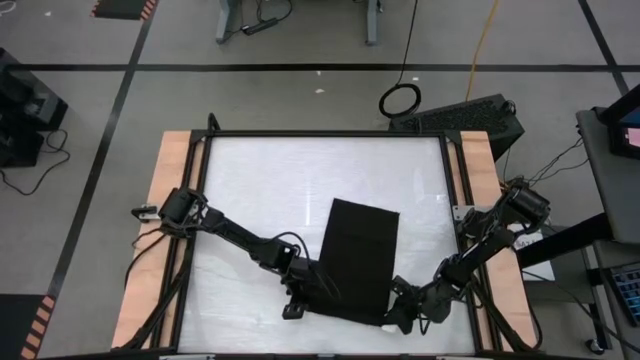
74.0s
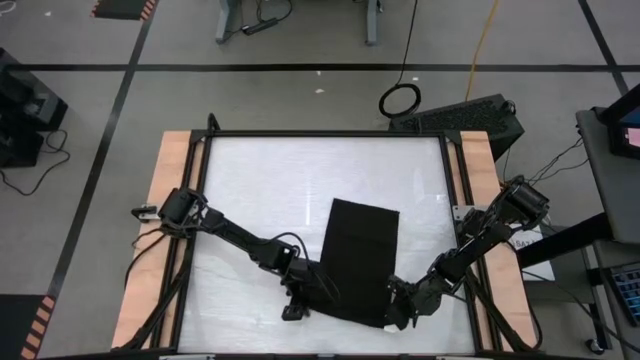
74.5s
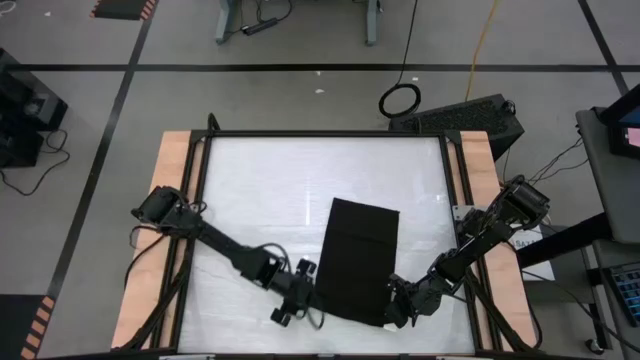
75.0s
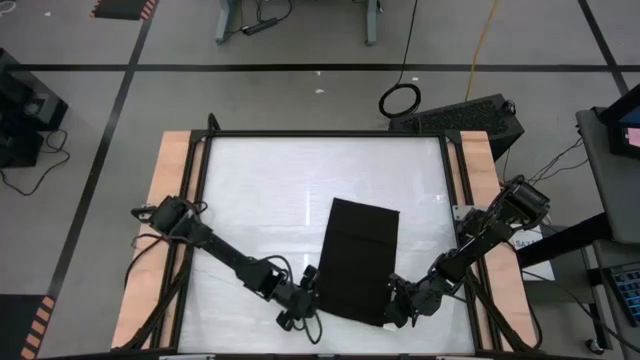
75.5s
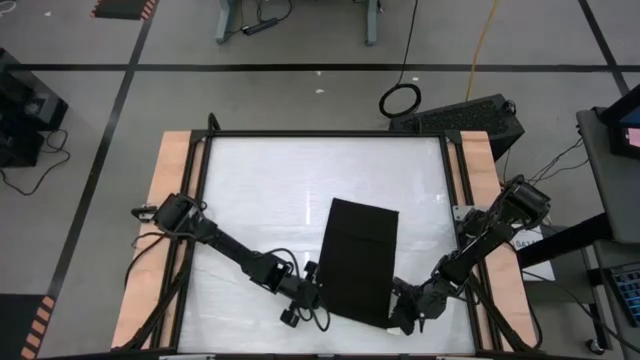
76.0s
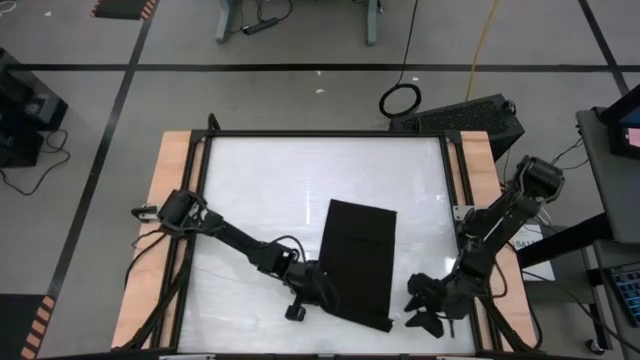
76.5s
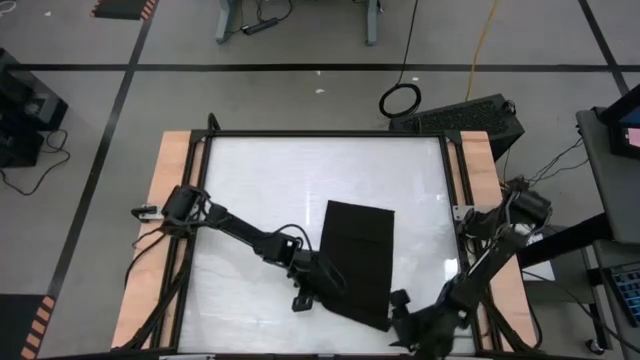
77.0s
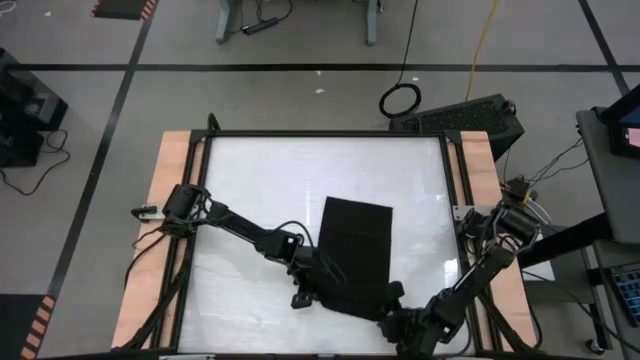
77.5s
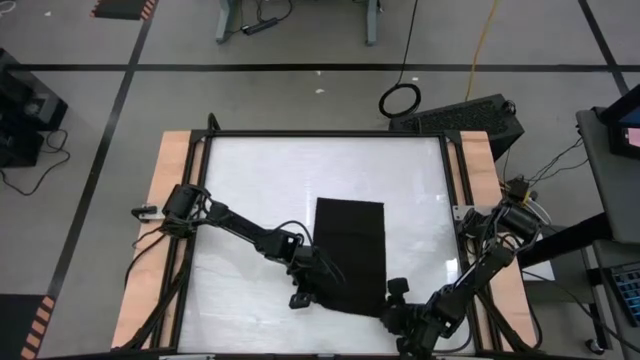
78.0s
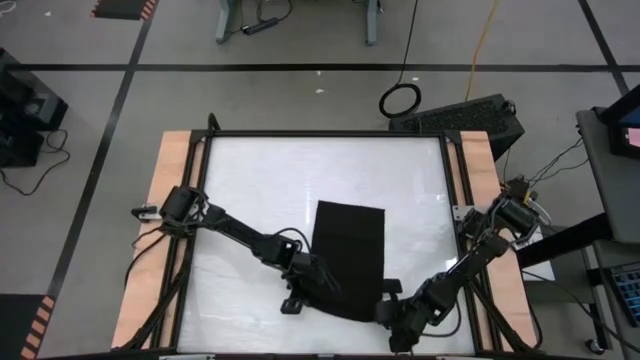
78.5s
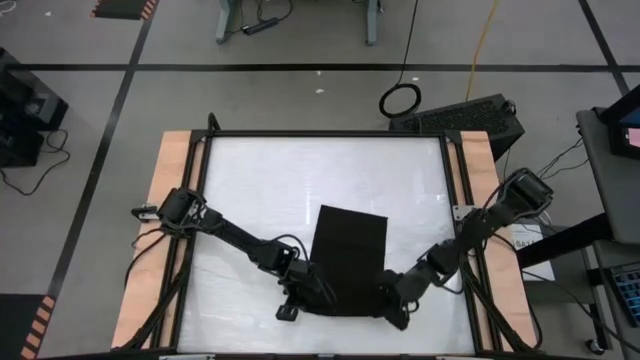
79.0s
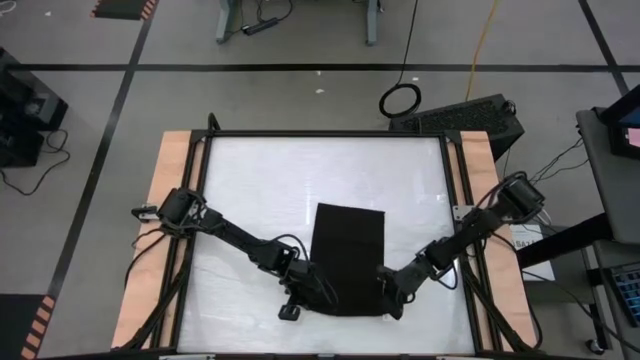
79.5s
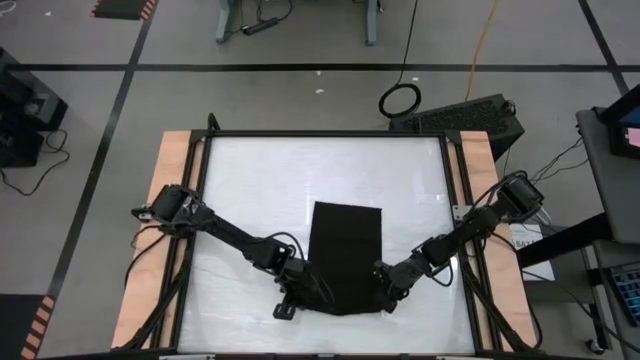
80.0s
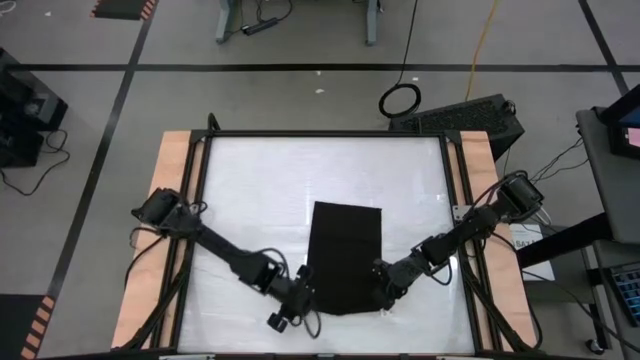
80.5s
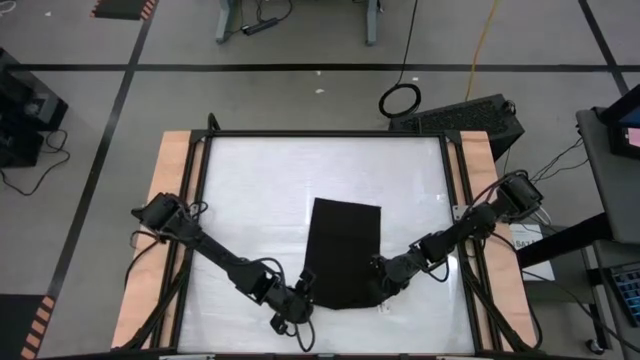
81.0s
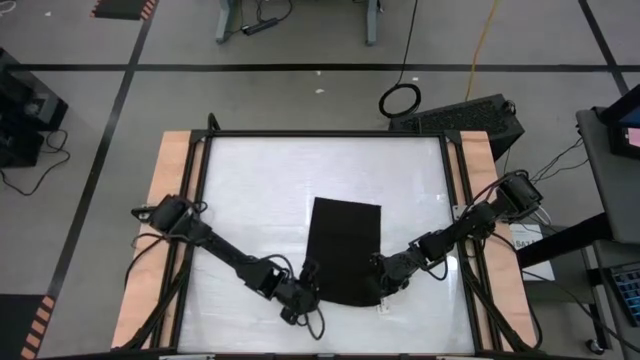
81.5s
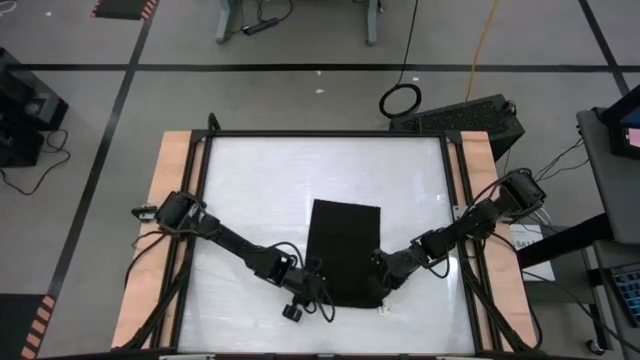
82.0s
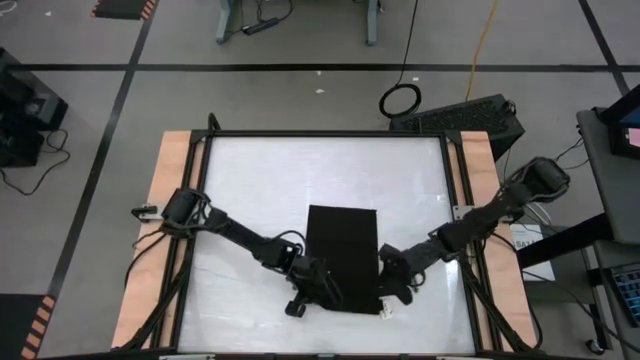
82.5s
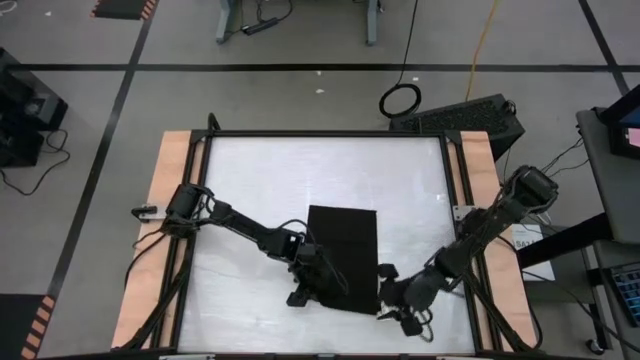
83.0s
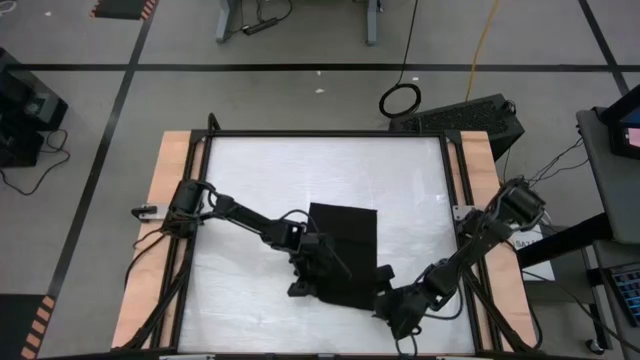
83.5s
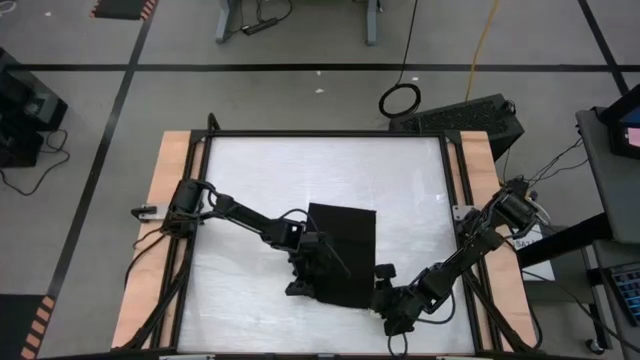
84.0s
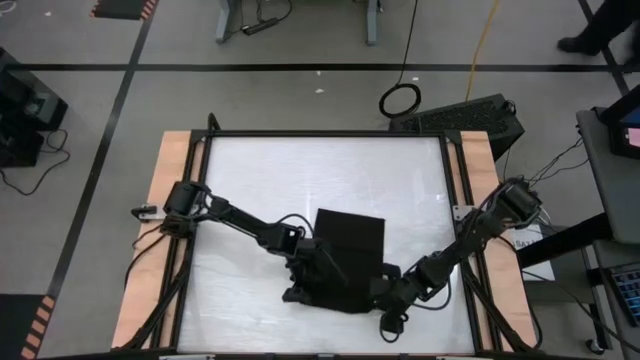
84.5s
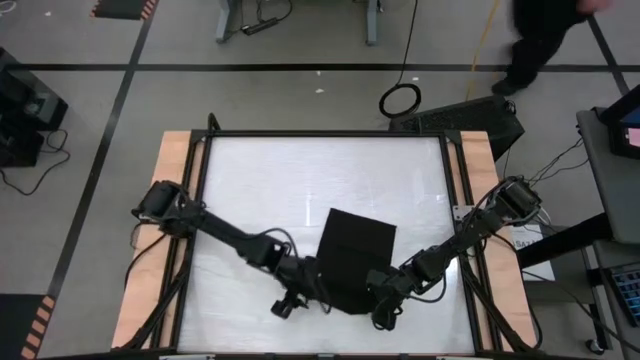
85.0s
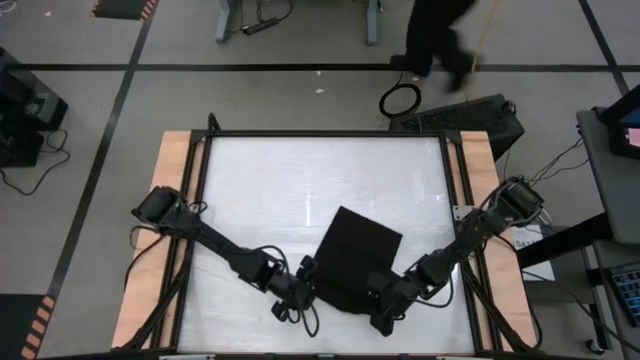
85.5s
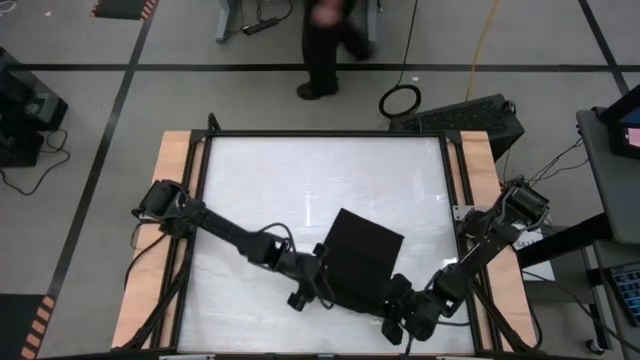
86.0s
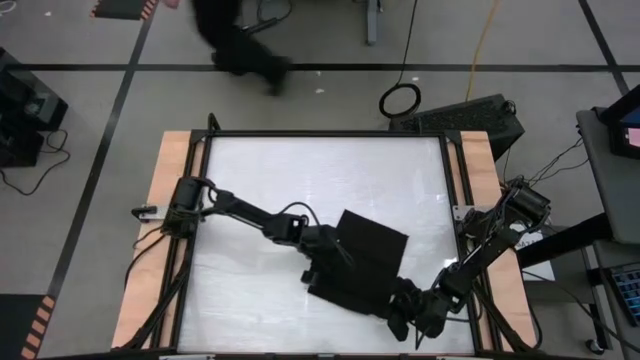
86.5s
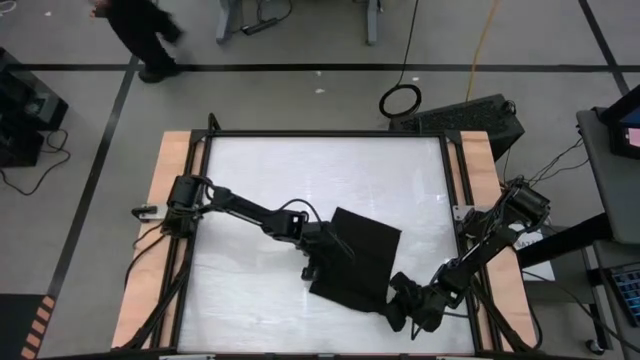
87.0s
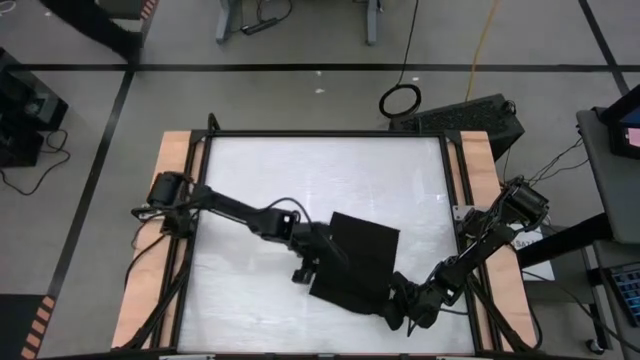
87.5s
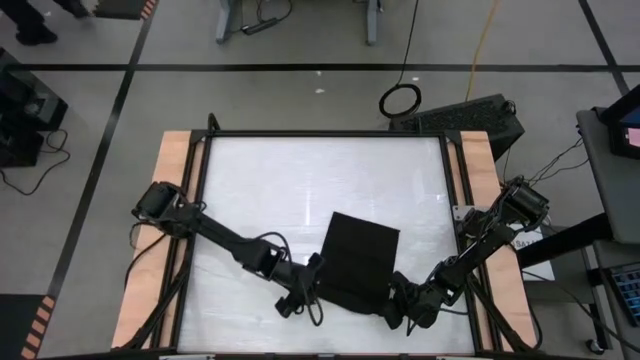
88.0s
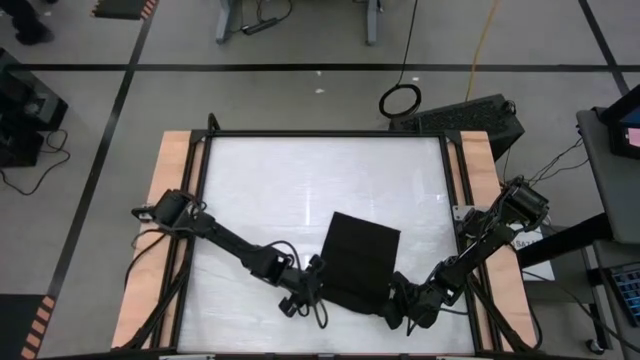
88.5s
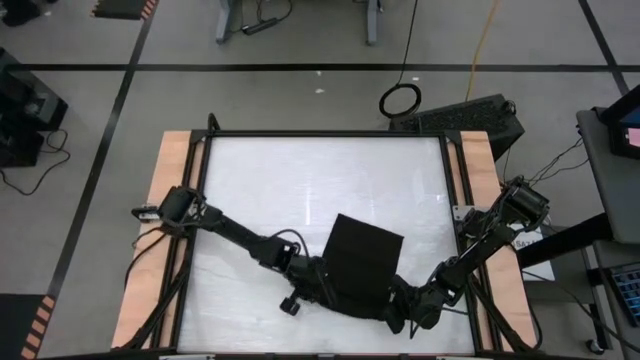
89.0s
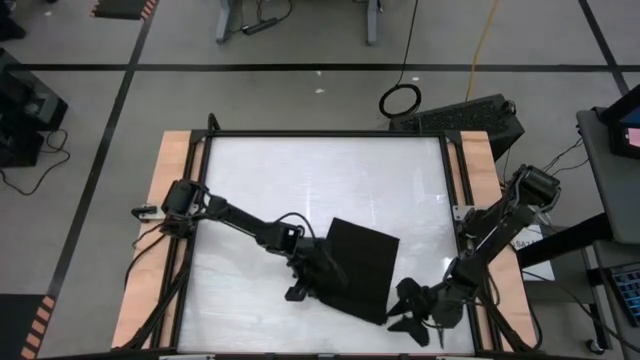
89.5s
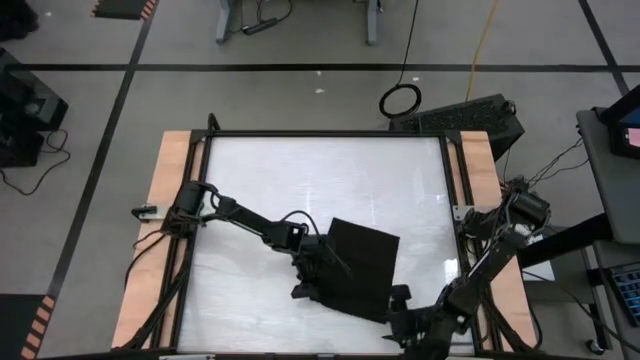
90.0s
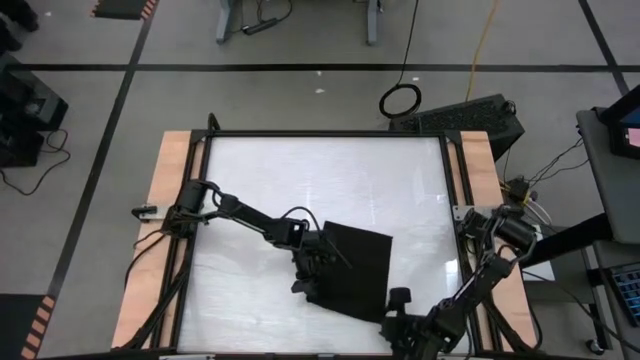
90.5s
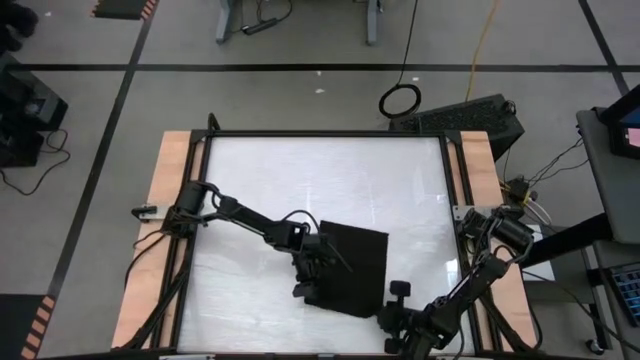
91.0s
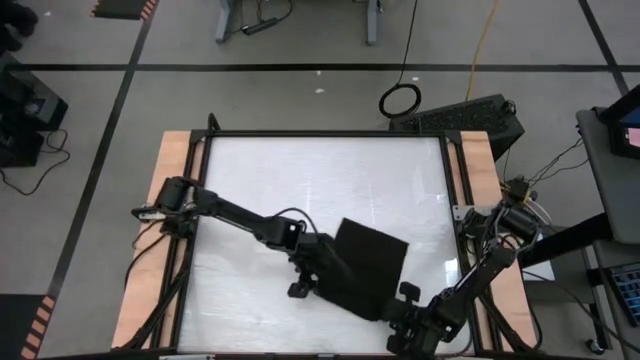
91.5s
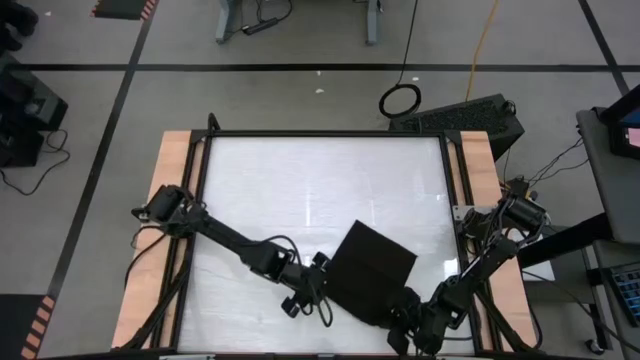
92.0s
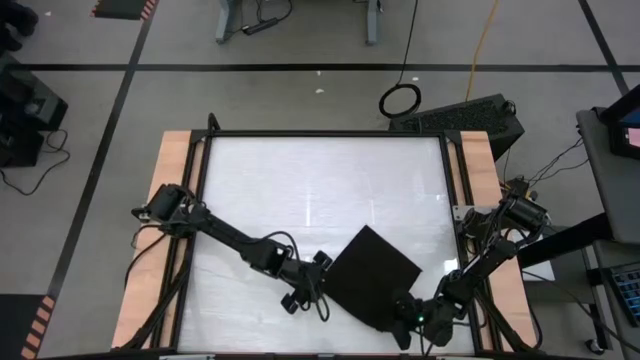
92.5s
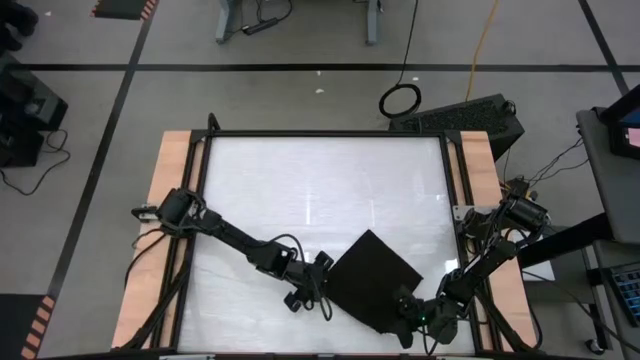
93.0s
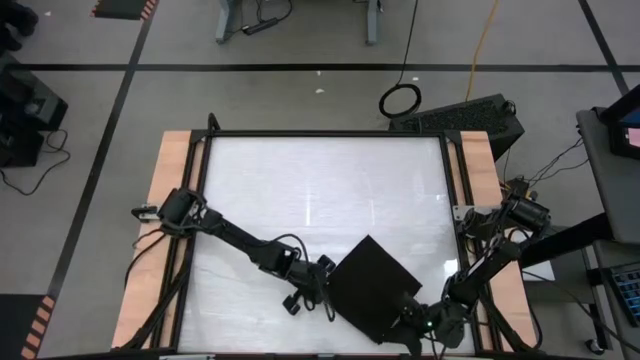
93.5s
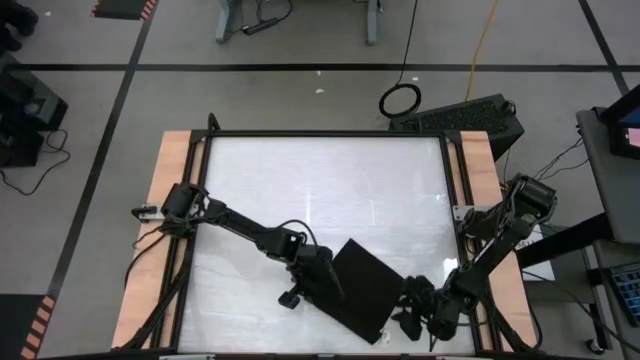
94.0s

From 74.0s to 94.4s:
Task: Roll towel into tight, uniform cylinder
Roll the black towel

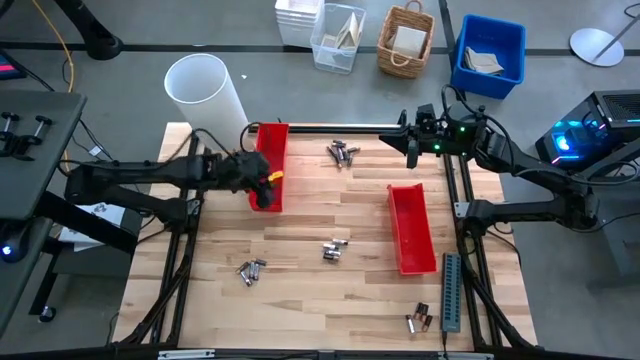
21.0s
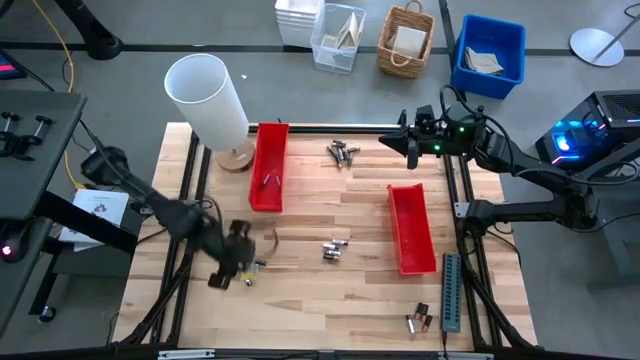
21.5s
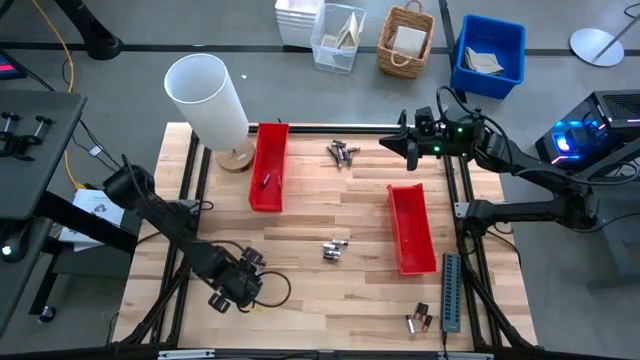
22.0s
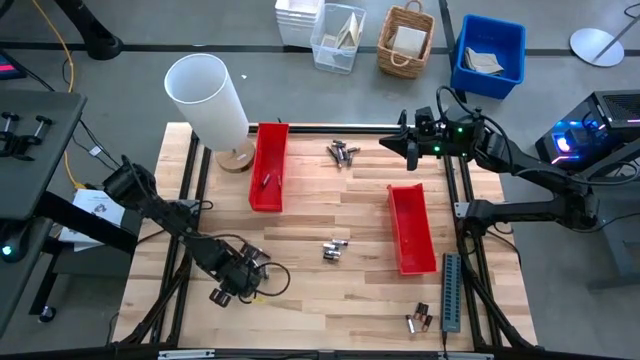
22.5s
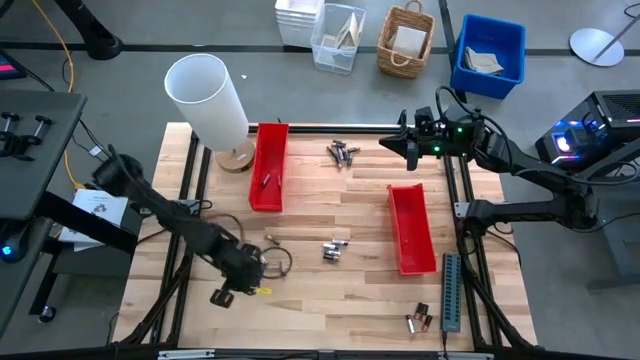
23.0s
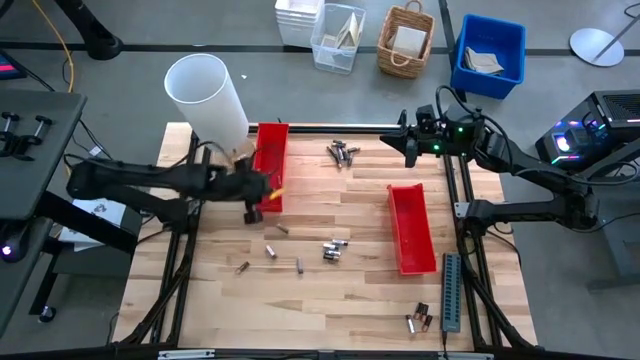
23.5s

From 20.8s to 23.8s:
Task: Sort batteries
Put the silver battery into the top red bin
